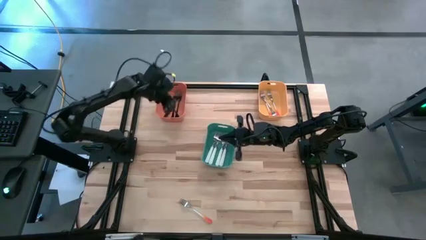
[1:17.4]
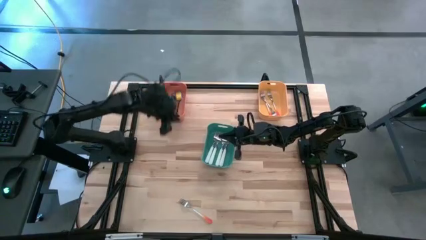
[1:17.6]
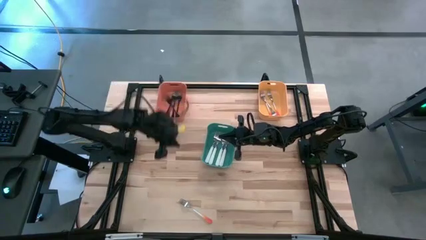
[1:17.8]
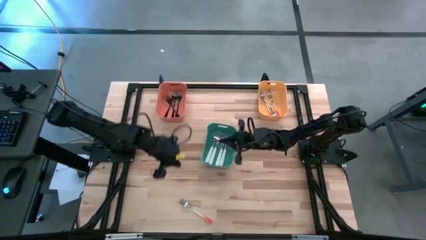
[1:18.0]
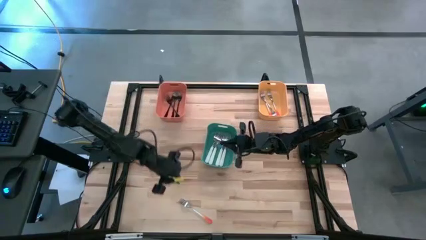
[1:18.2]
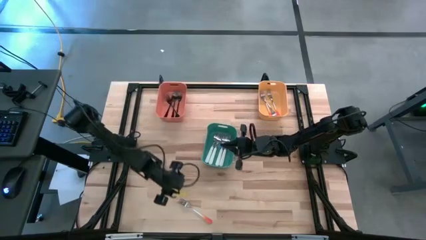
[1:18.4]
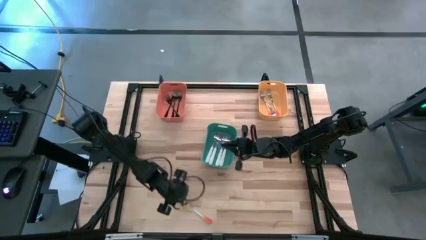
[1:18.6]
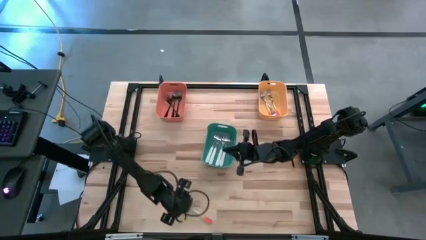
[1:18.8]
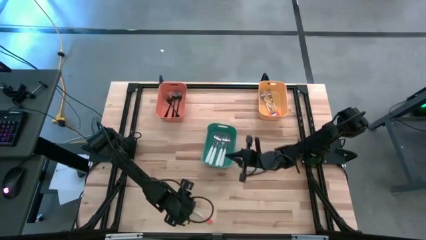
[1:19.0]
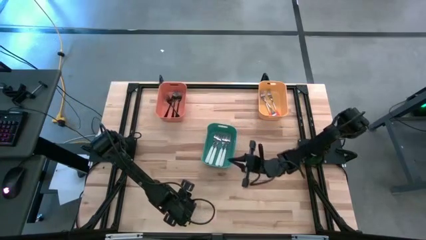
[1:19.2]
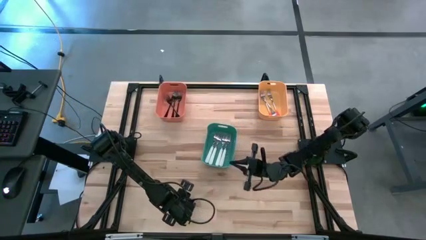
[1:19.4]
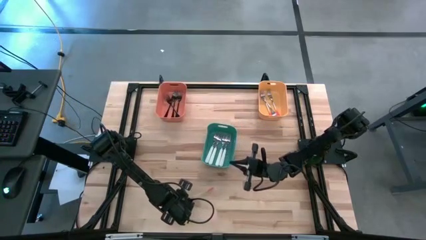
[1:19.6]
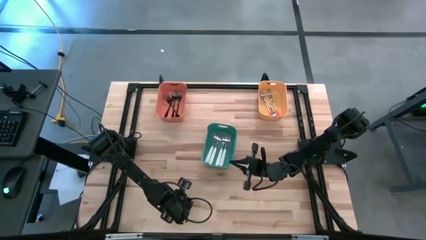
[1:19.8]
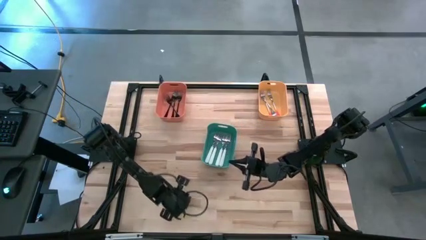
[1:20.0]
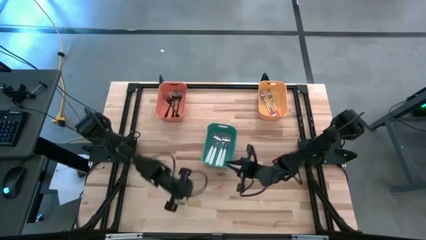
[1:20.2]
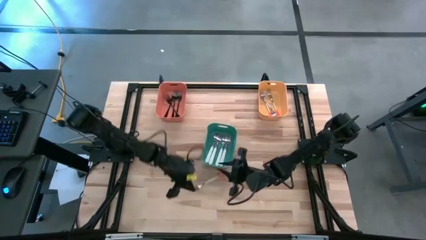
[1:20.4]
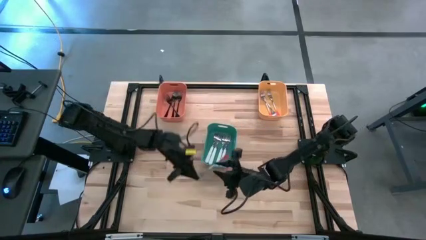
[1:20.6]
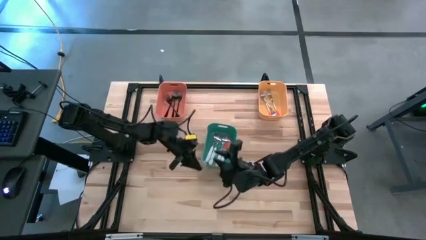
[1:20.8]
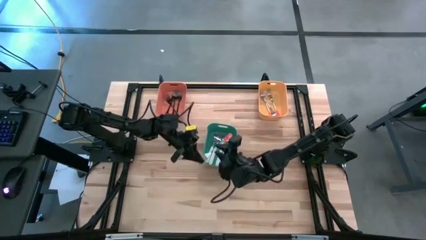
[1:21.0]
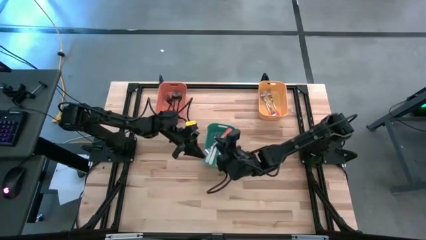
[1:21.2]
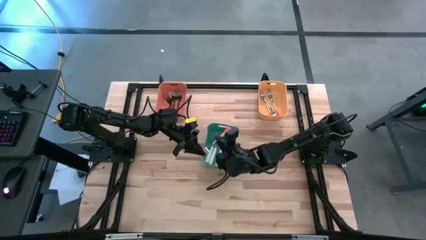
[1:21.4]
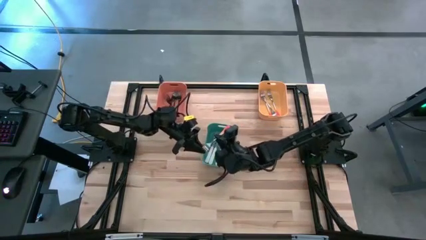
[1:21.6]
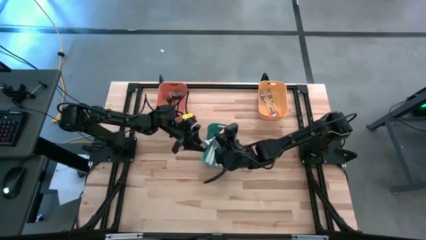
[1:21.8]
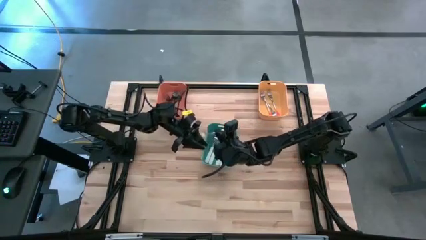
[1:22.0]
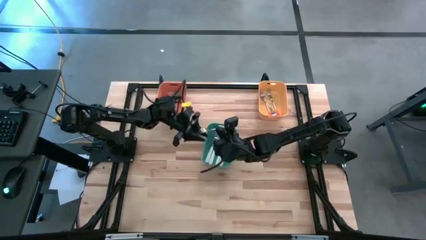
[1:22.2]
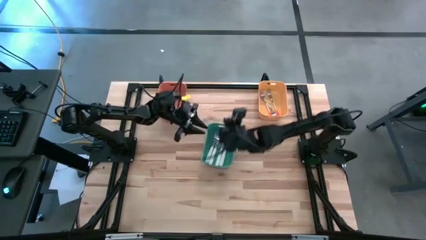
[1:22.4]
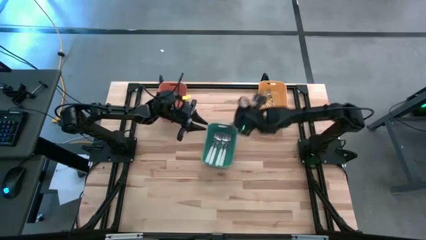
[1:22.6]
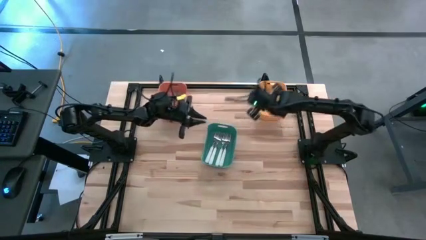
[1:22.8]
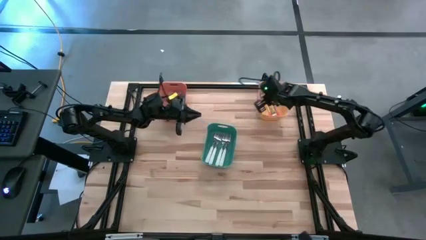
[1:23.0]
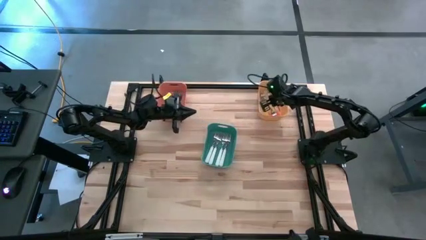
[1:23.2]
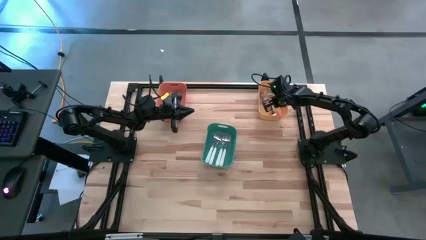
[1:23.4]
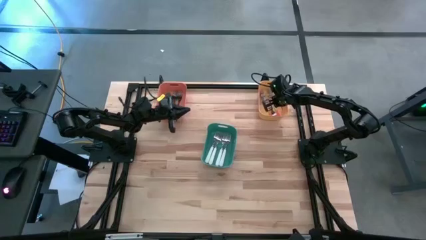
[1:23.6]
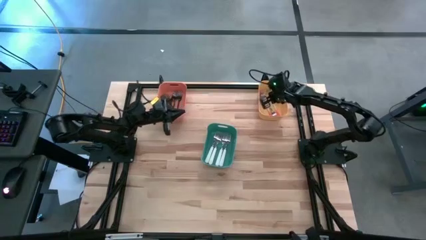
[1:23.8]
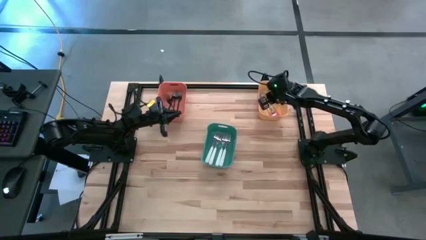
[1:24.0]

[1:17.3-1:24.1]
Task: Sort silverware by color (type)
Put the orange fork into the yellow bin

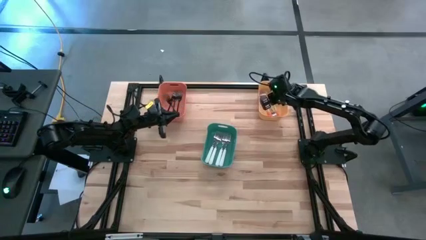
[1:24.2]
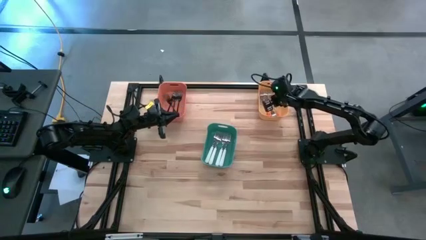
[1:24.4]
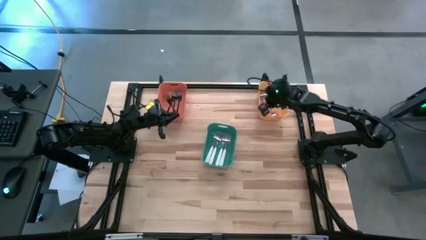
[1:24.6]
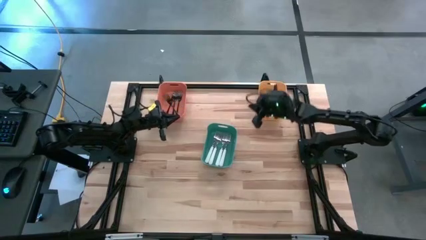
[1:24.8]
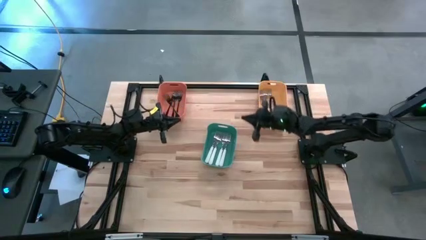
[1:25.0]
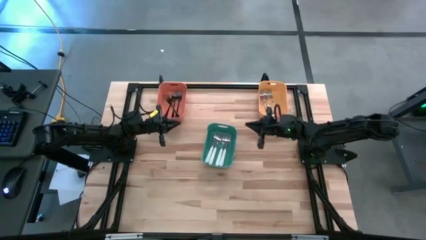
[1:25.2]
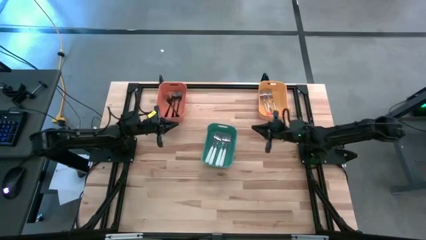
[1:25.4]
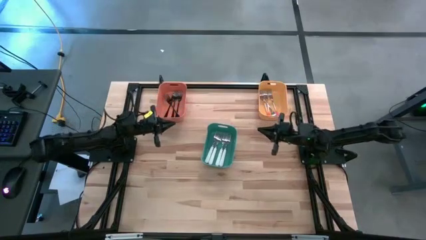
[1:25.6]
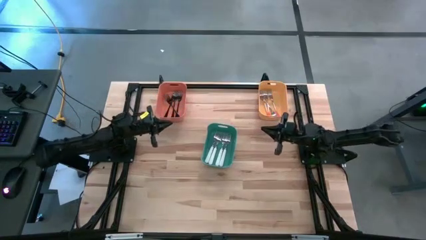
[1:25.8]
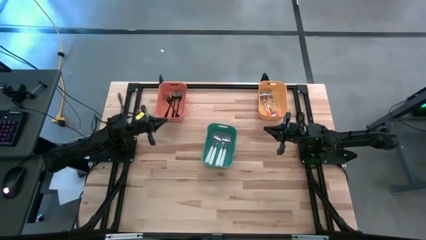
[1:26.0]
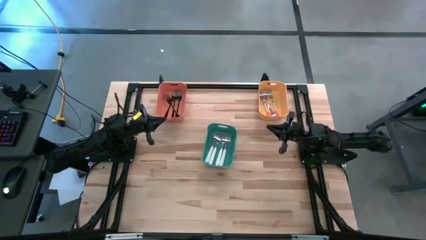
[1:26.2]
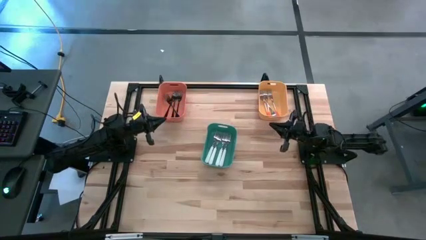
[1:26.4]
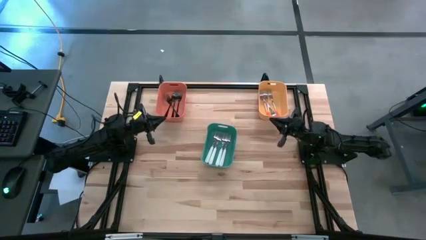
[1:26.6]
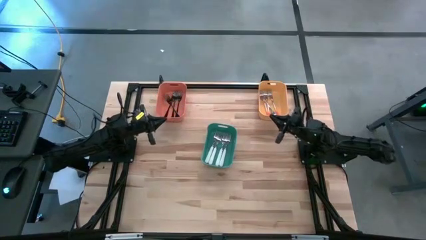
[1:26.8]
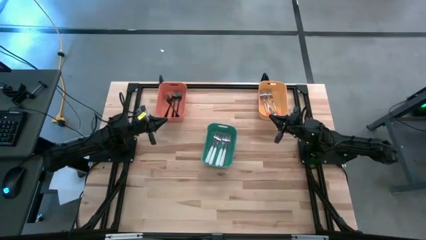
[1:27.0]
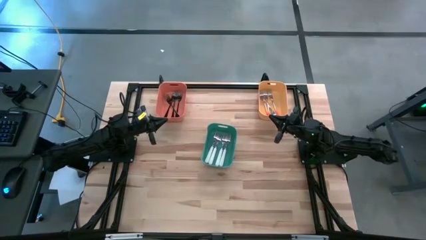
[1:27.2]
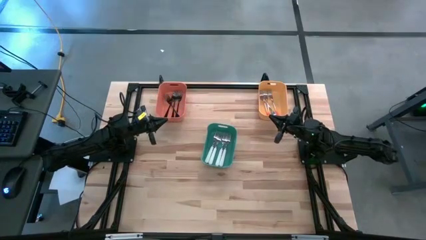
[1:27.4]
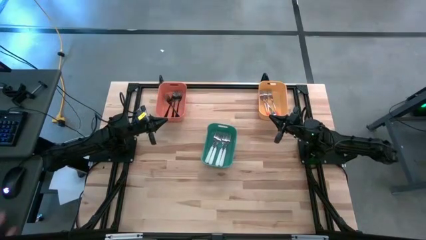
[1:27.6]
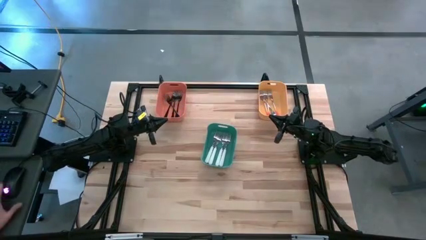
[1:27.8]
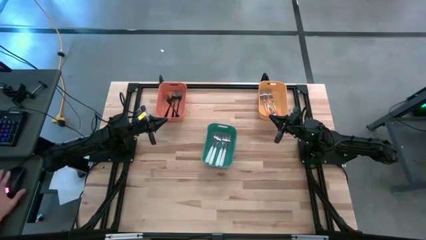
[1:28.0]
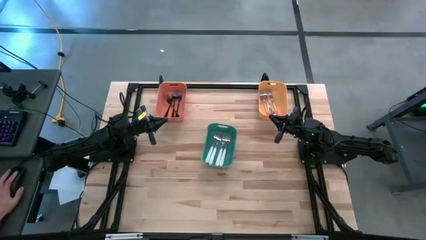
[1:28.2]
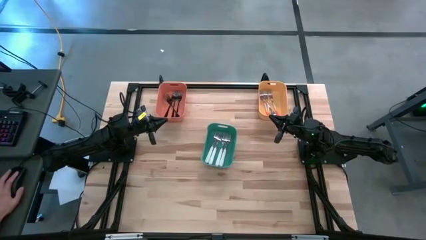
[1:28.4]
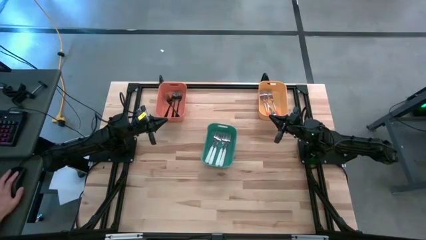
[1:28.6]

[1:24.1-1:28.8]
Return to Home Position
